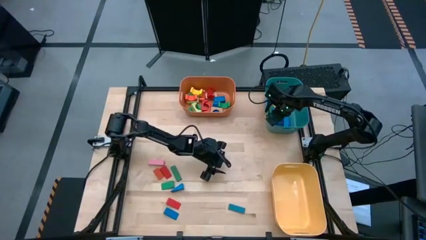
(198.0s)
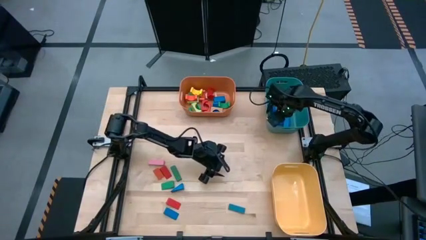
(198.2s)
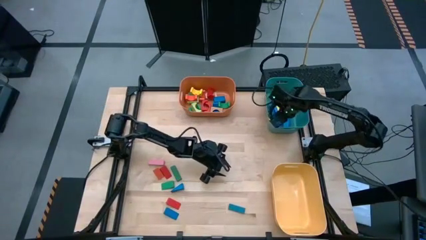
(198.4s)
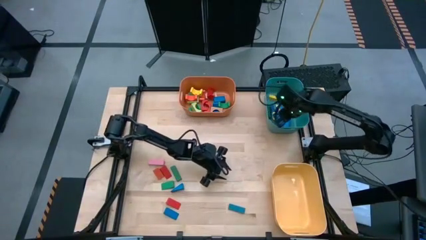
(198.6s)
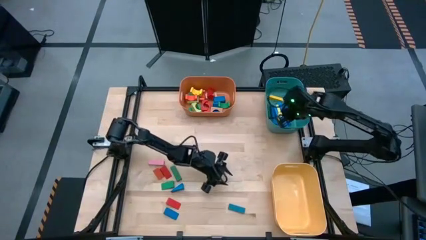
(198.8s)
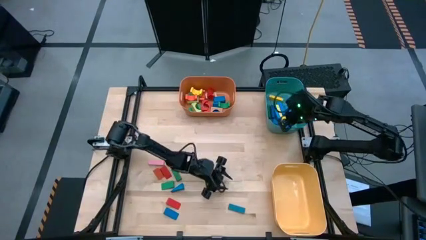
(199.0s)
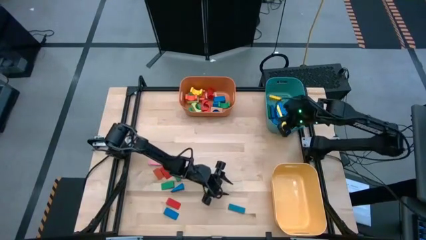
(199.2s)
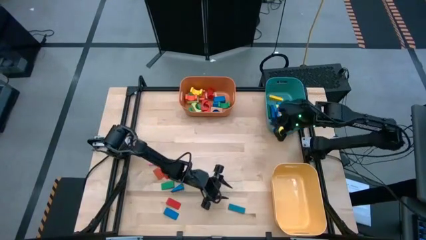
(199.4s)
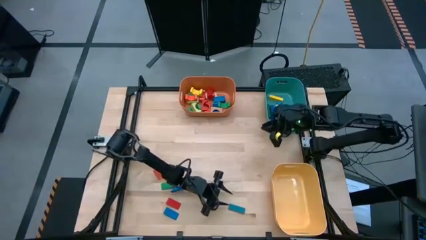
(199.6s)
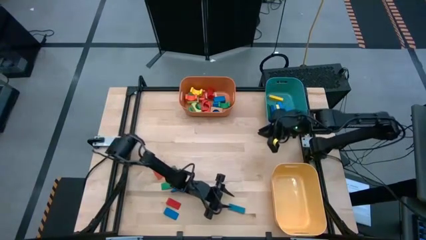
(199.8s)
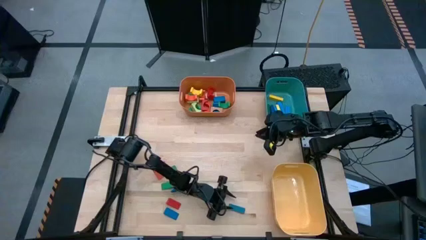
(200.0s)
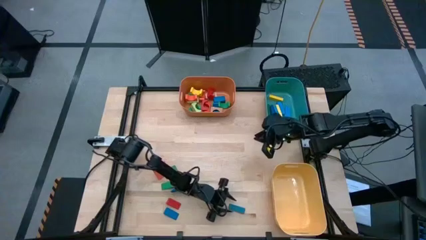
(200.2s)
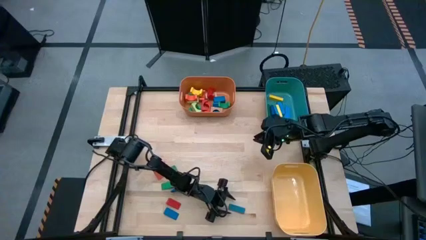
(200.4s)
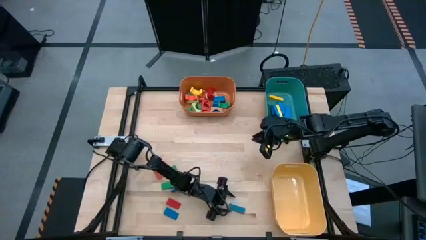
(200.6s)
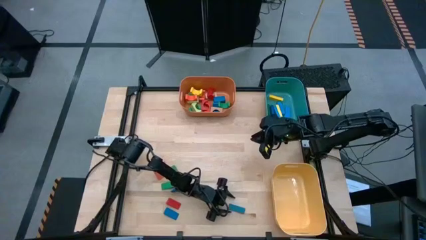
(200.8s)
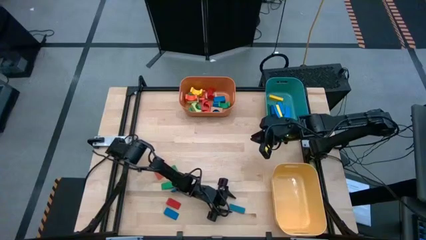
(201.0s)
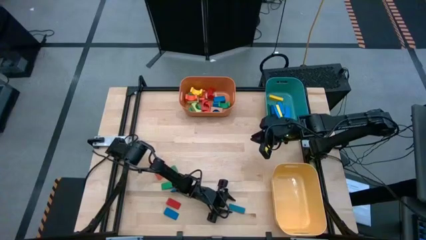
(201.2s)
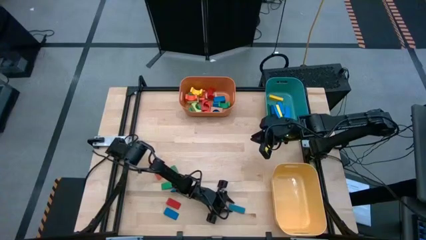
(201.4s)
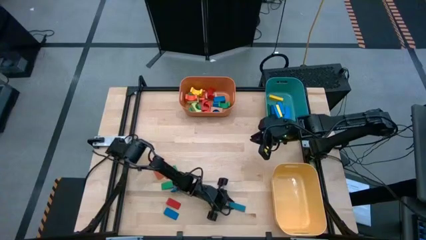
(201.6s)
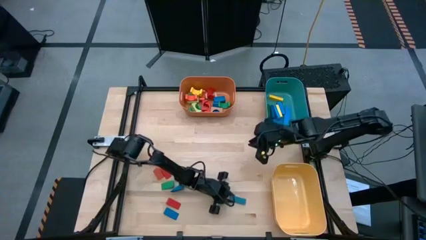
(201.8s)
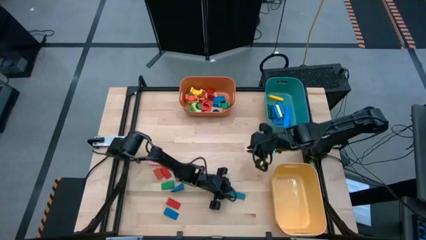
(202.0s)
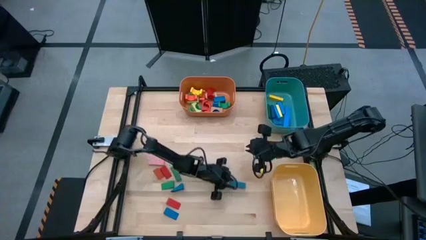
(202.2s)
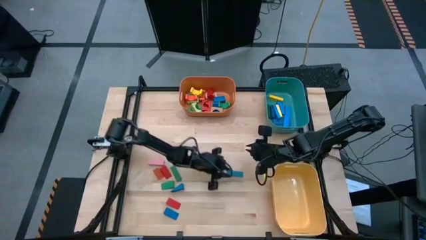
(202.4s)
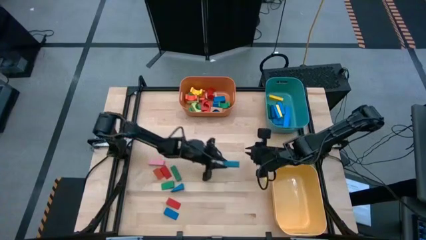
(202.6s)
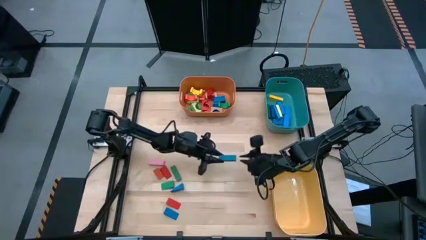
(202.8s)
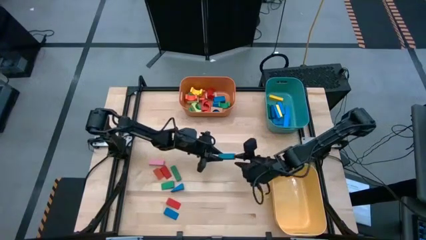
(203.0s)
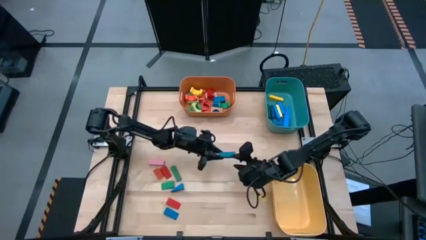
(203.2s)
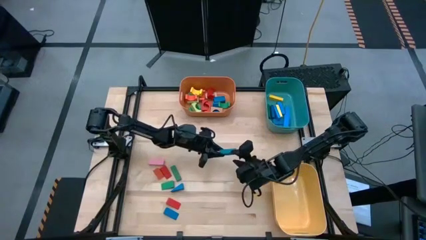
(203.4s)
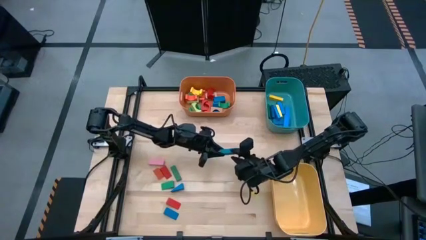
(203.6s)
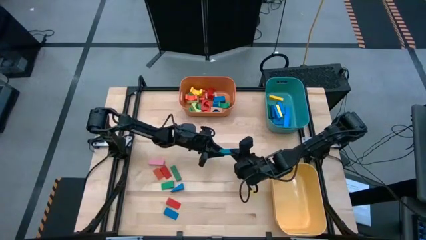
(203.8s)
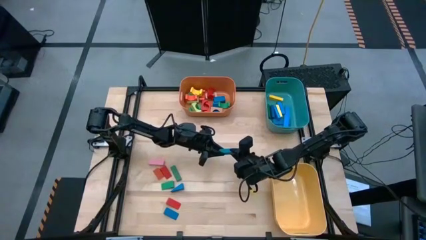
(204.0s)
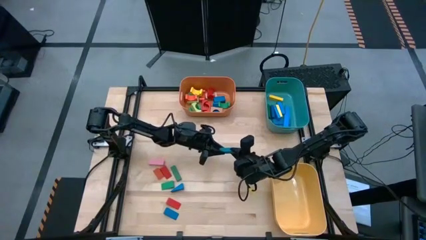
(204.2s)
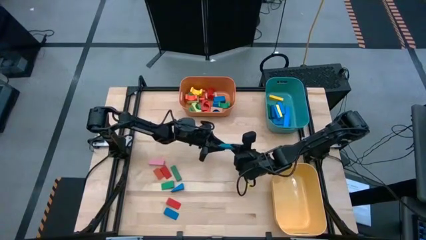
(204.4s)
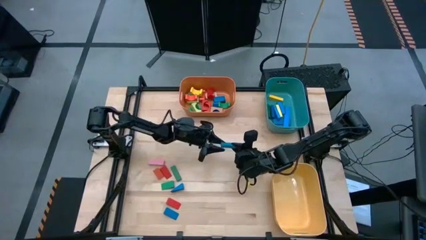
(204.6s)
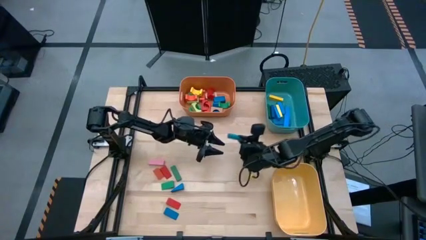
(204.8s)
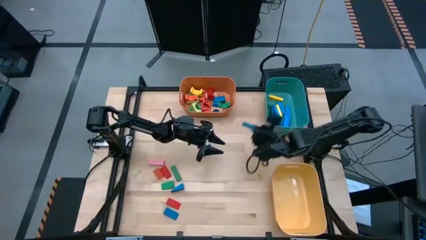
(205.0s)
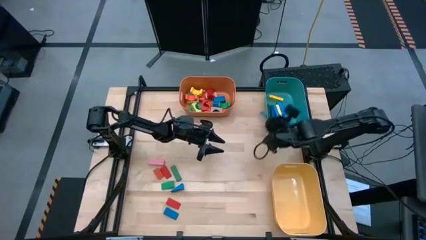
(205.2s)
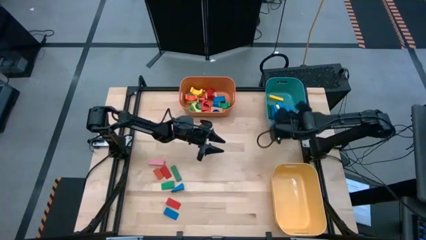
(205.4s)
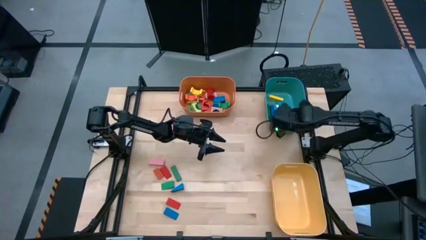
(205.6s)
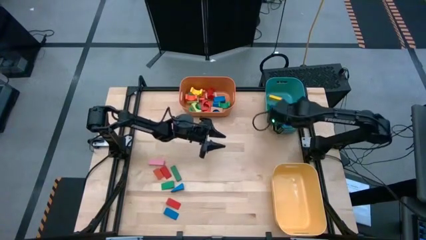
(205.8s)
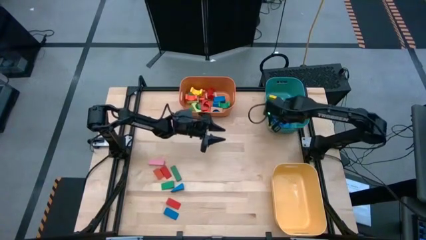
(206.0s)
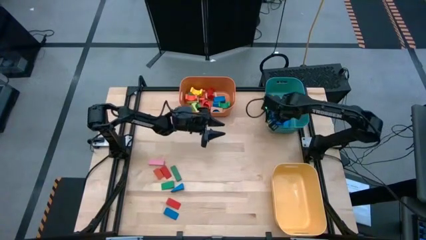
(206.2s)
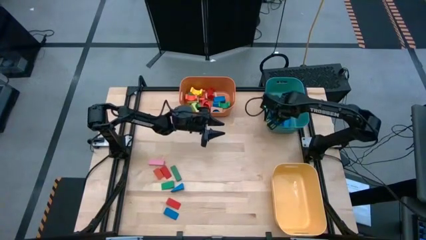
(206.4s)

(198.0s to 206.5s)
Task: Sort blocks by size
Put the blue rectangular block into the green bin

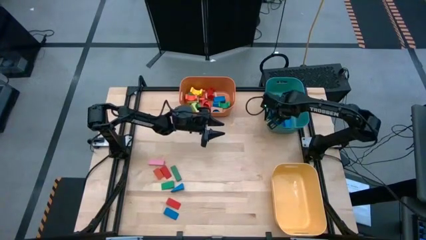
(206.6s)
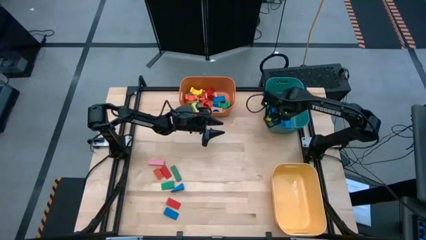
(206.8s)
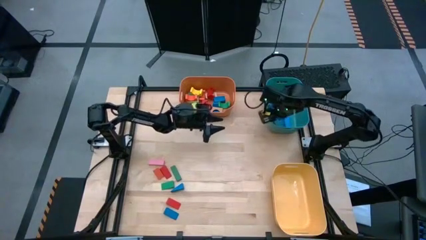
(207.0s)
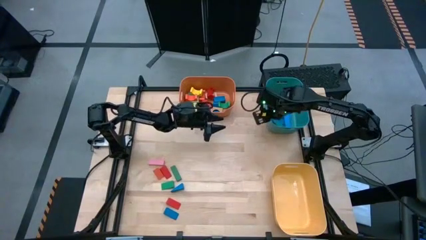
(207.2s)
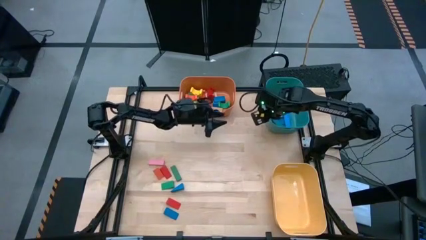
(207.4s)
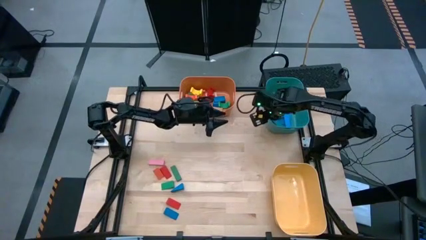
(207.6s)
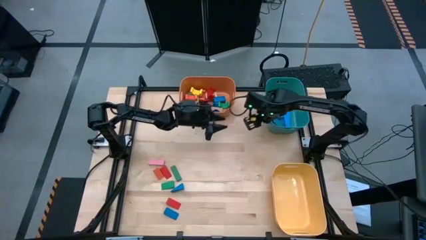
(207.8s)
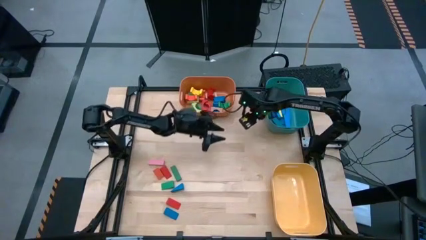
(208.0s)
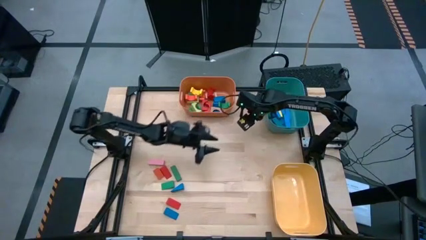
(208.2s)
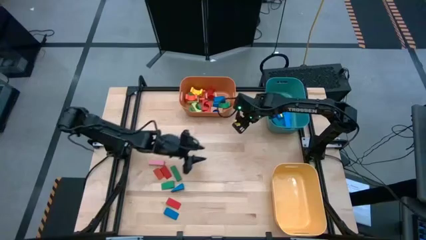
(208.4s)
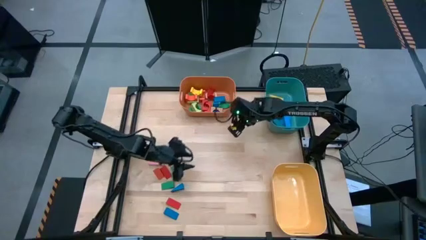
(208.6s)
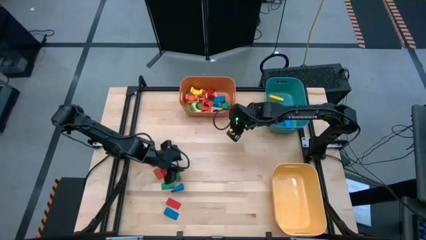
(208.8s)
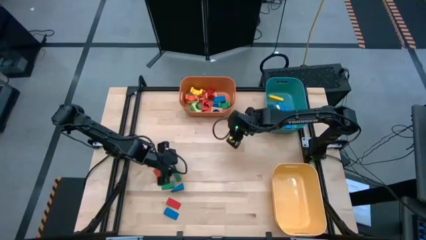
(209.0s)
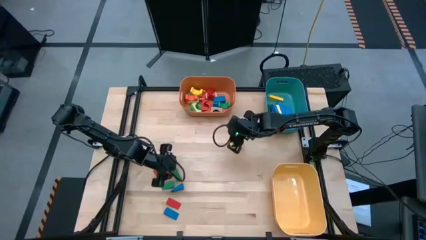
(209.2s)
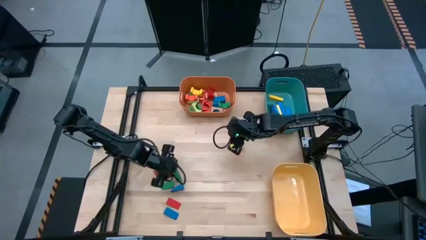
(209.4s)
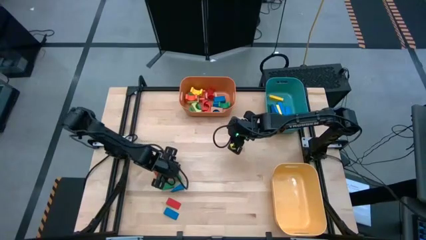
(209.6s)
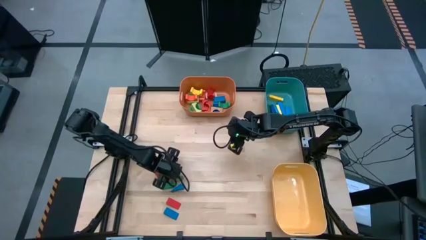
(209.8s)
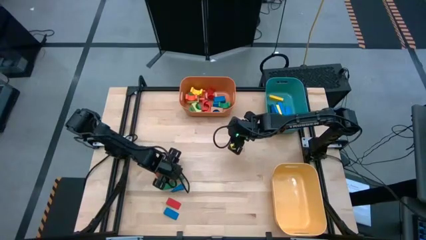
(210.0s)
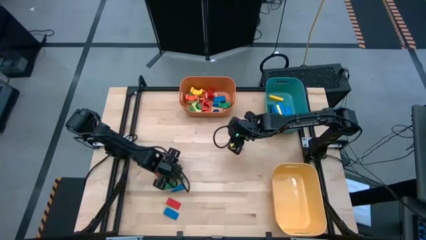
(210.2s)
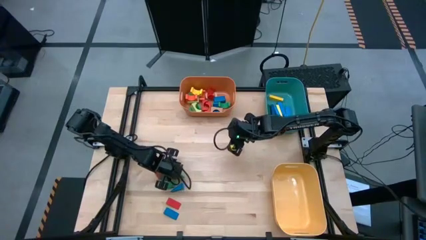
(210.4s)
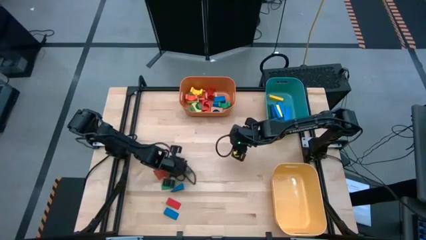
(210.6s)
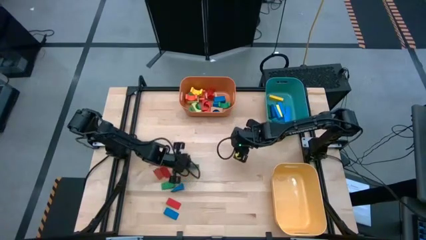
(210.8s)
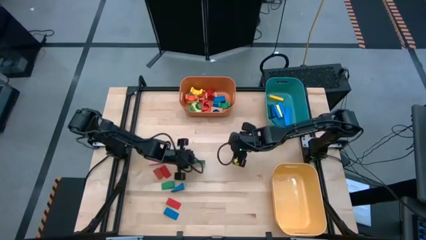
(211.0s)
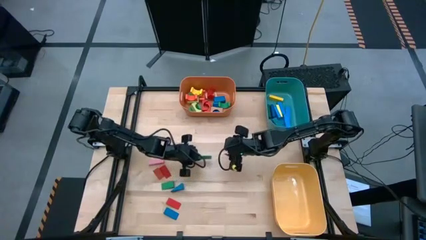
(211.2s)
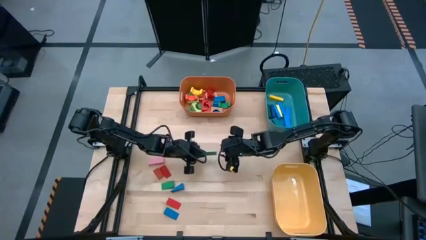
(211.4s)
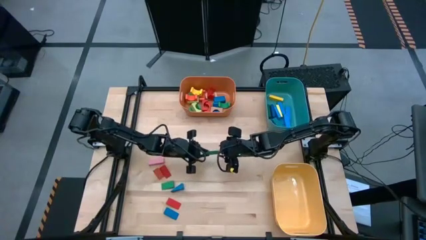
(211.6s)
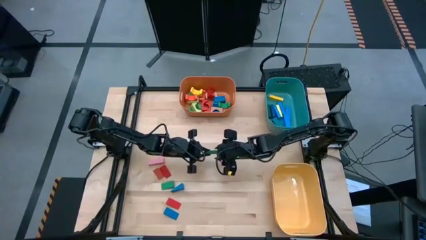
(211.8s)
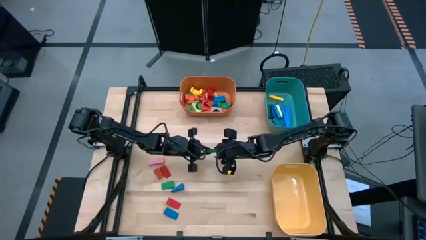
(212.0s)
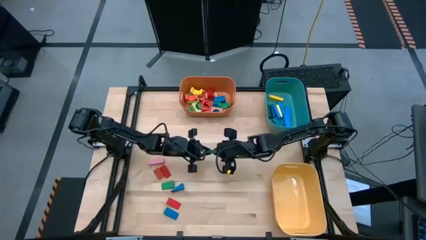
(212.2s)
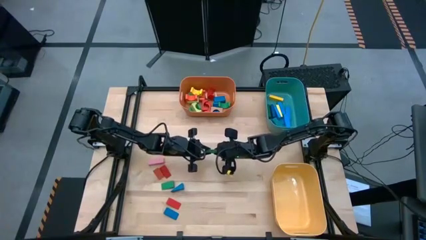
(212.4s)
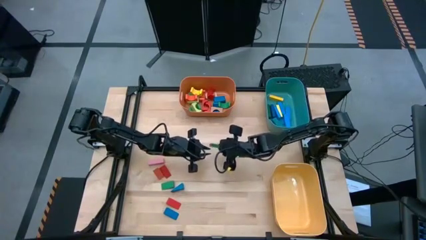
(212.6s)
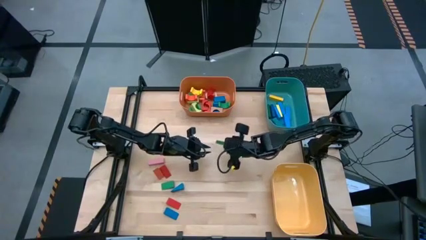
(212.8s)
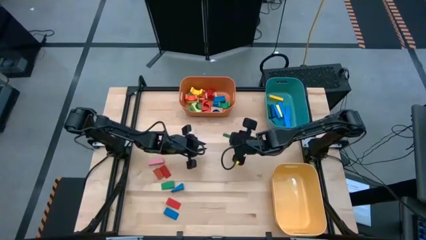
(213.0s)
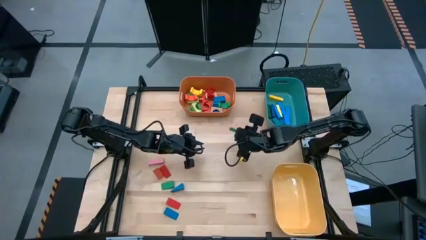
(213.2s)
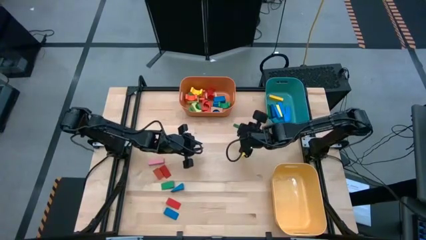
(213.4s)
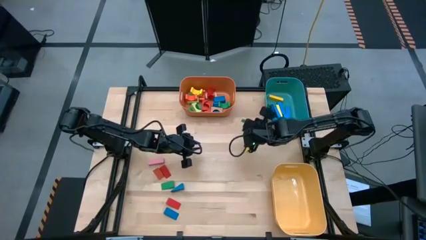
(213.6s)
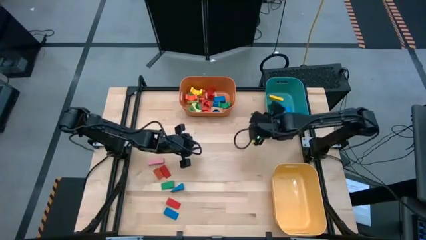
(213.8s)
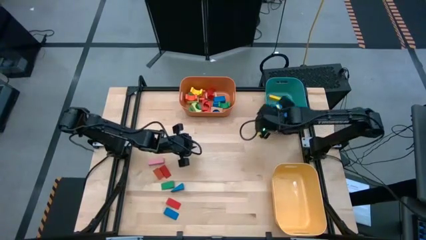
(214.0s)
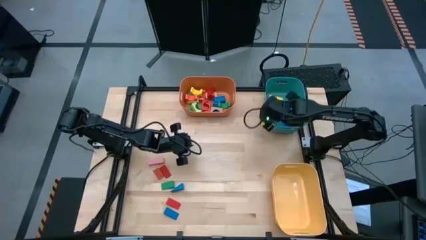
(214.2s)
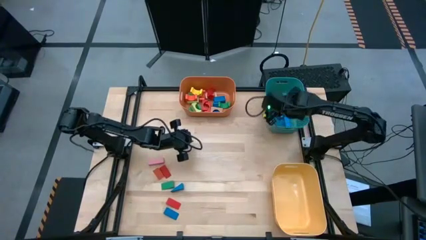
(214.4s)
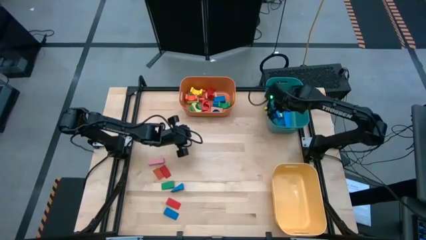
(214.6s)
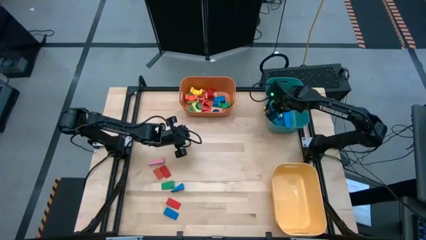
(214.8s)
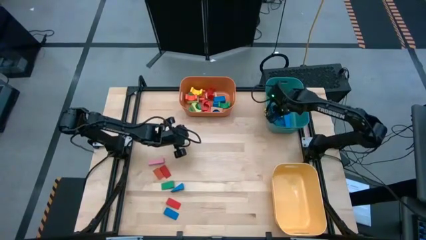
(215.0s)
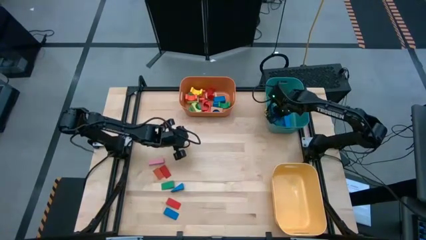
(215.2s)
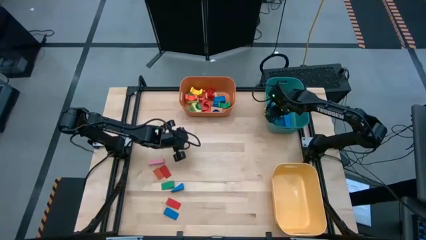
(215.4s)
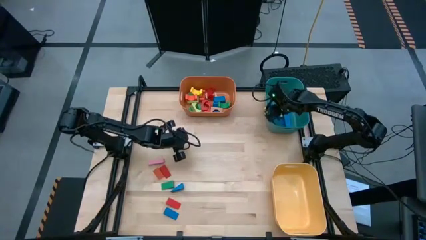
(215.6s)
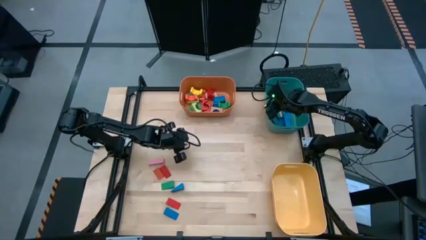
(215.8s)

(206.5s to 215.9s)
Put the green rectangular block into the green bin
